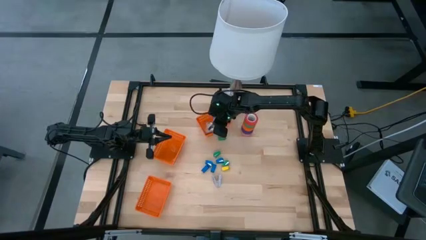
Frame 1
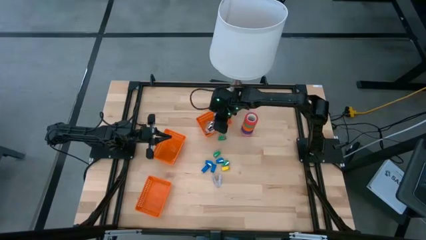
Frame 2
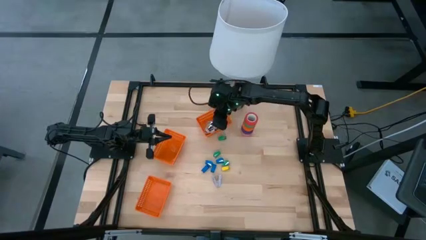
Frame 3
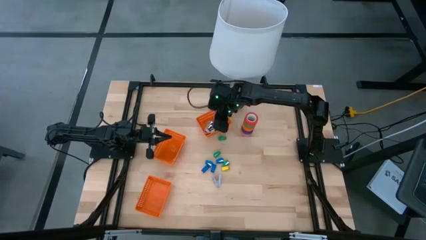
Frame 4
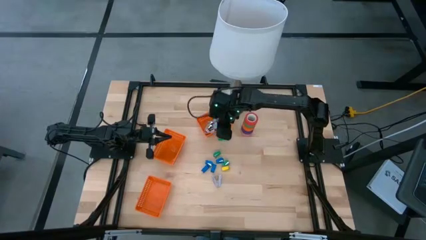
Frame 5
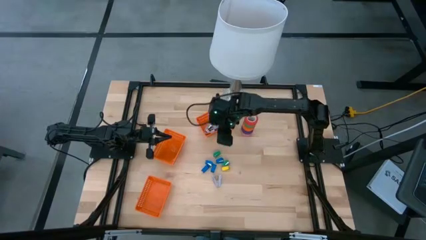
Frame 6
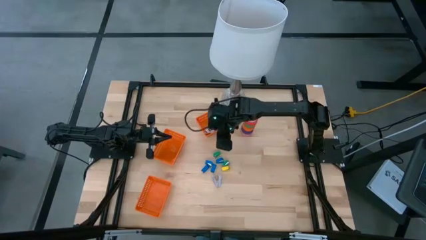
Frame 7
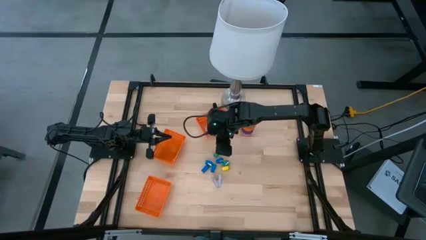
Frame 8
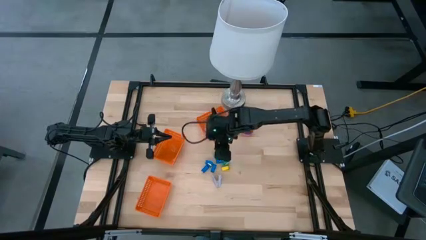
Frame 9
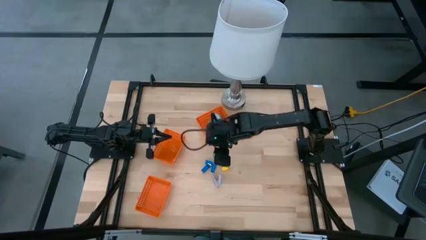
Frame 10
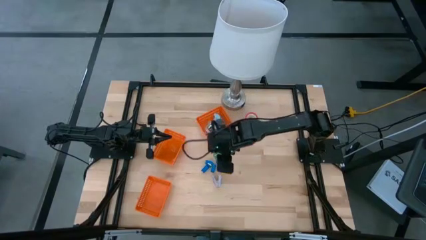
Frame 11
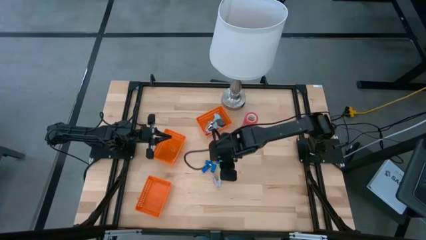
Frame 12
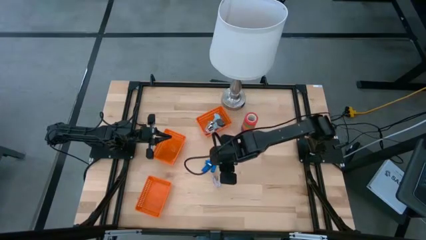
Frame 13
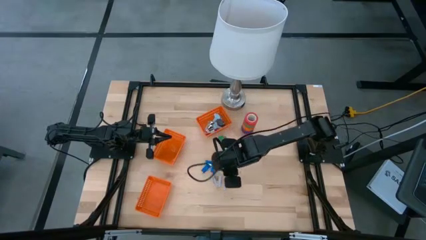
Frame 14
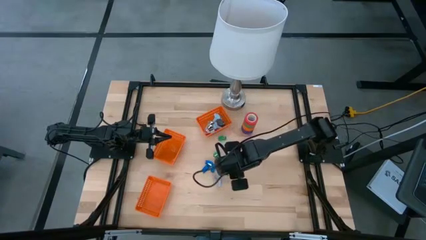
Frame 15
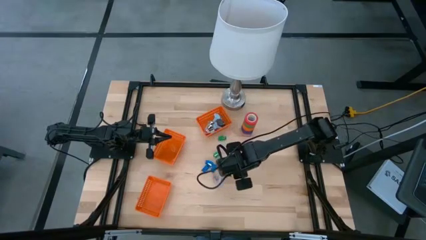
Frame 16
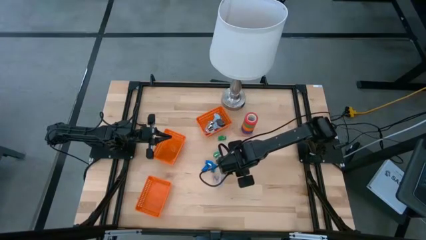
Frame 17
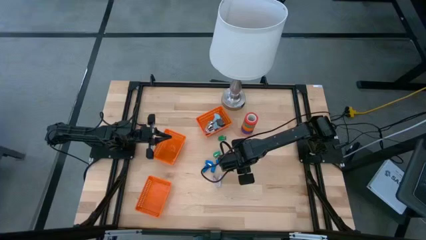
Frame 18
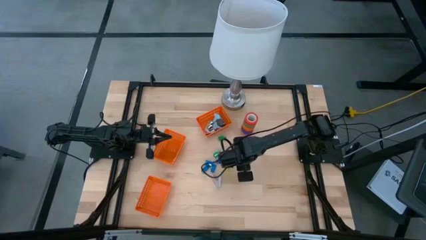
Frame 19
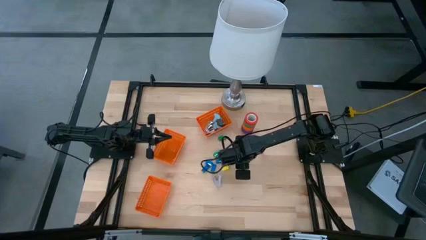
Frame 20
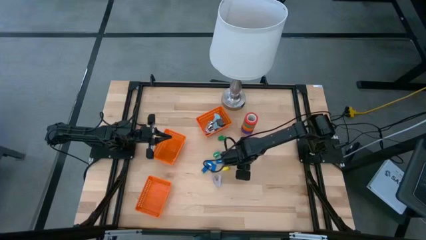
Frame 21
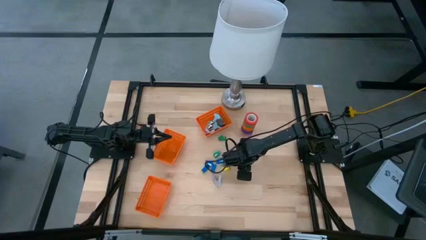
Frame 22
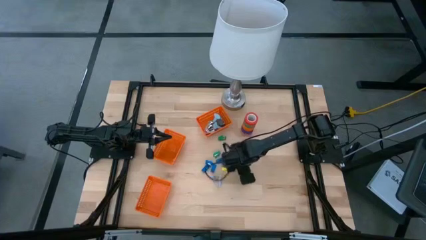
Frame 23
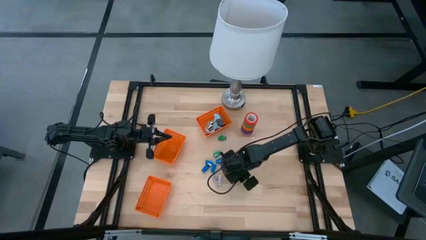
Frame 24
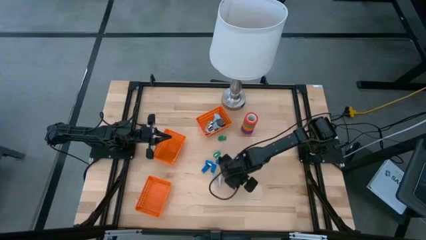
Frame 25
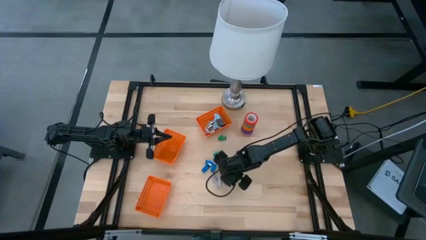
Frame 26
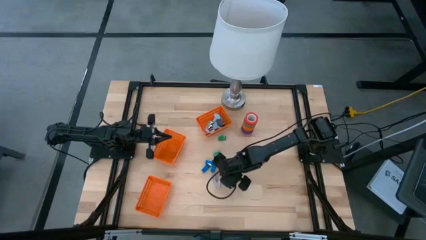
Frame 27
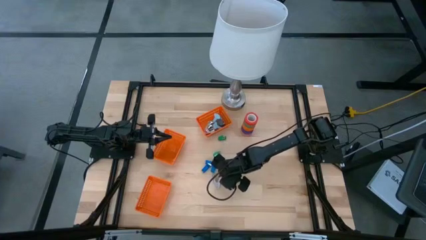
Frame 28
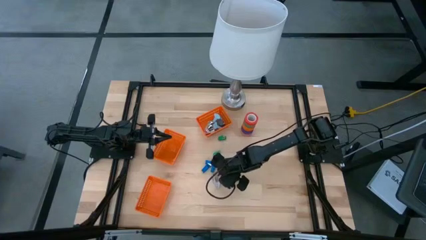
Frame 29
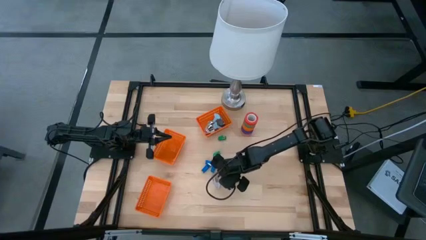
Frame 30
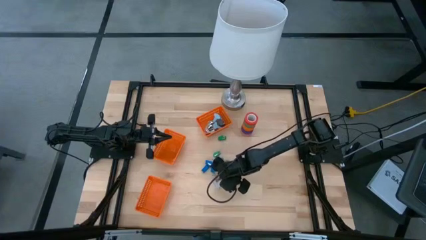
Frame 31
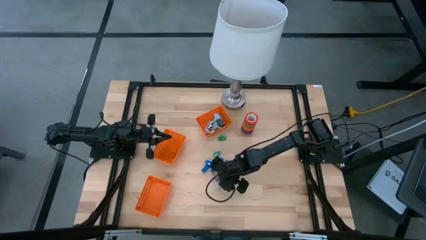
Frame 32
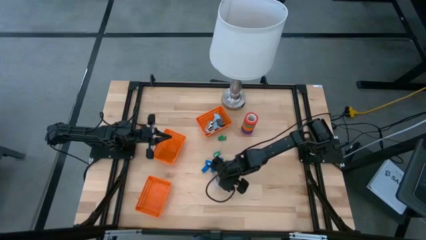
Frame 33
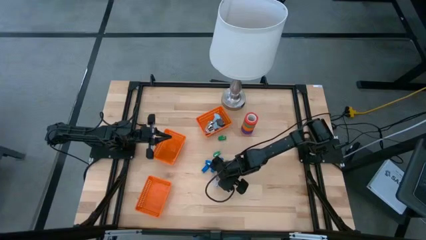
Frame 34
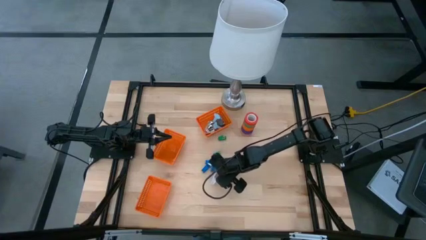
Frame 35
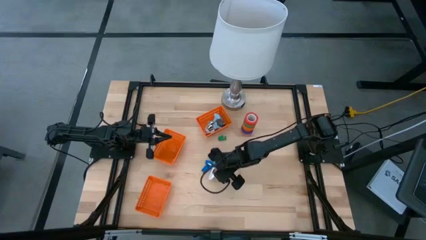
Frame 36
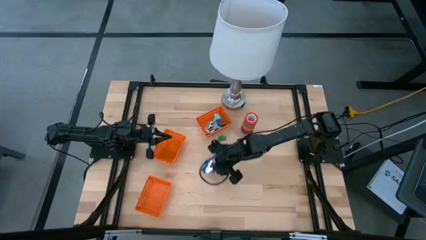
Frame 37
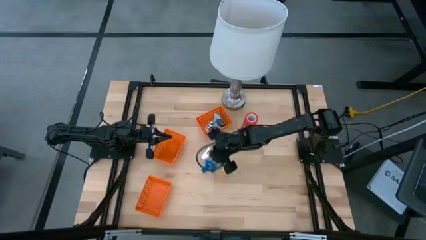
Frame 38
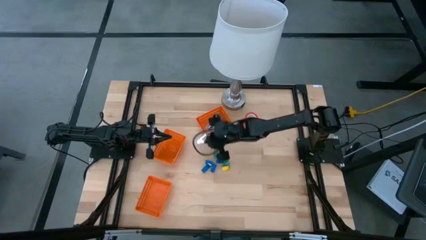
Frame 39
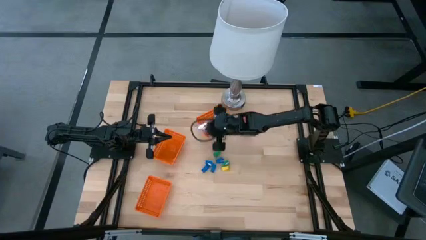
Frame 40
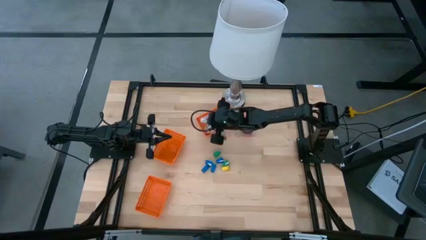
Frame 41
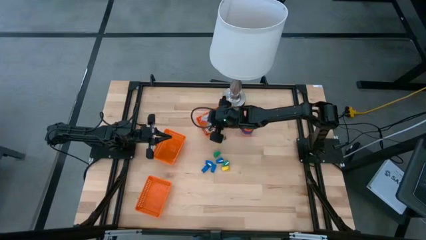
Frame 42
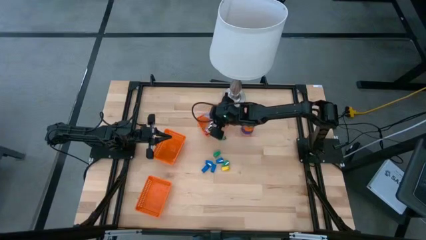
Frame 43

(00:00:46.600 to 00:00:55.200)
Task: Pick and place Stapler, Stapler remover, tape
Put the purple staple remover into the top orange bin

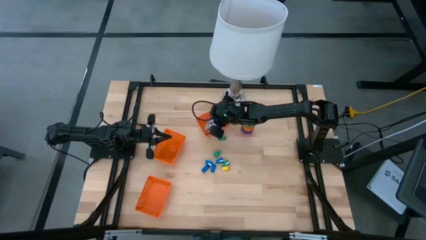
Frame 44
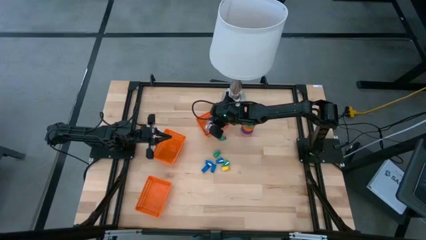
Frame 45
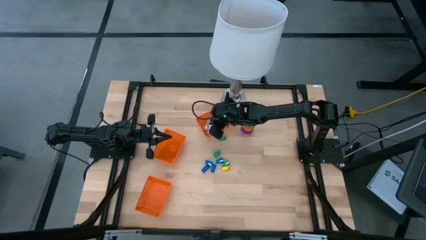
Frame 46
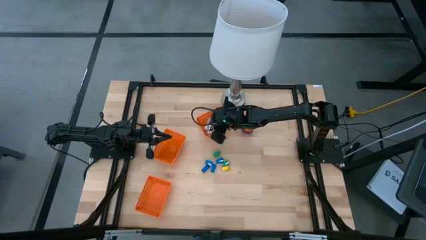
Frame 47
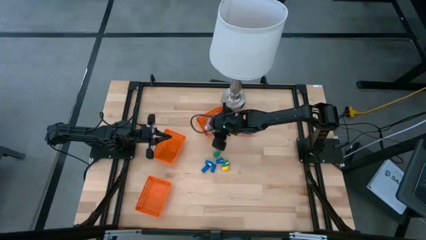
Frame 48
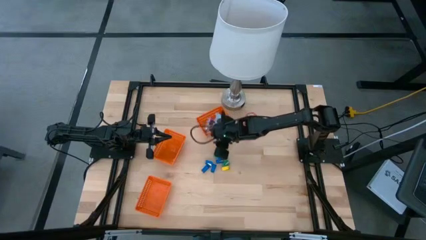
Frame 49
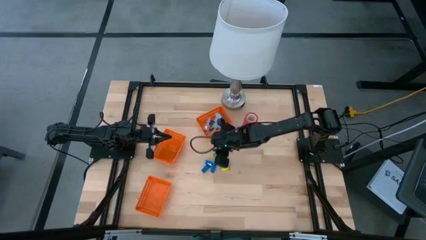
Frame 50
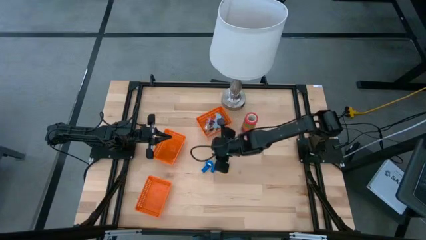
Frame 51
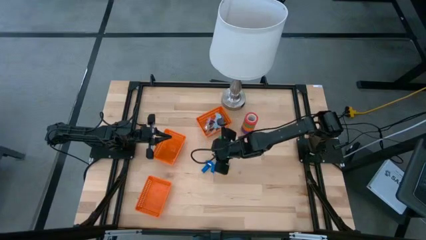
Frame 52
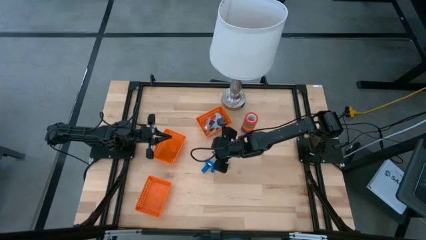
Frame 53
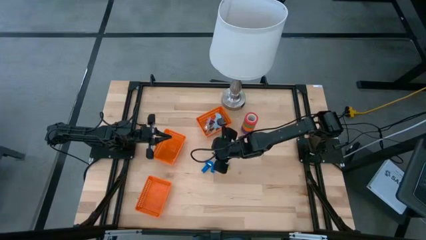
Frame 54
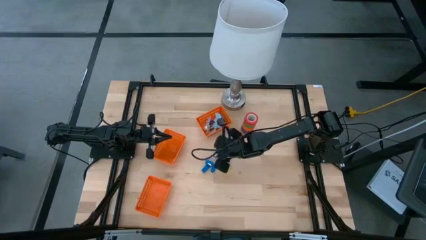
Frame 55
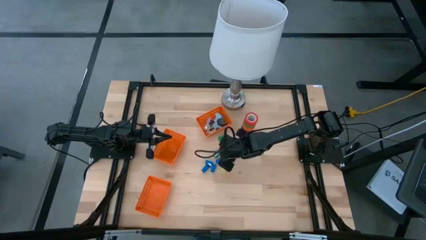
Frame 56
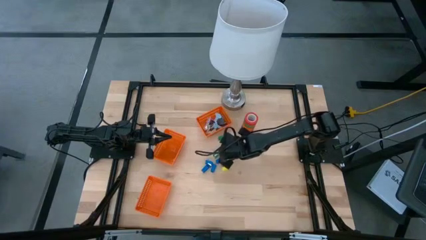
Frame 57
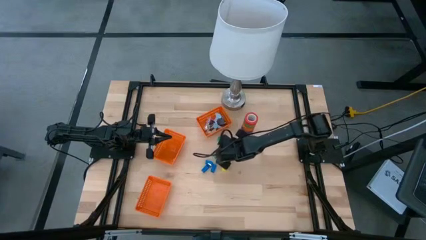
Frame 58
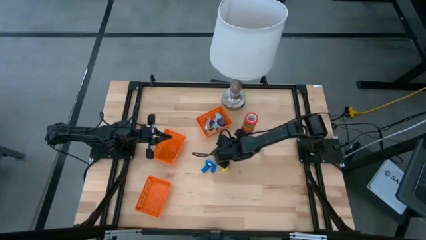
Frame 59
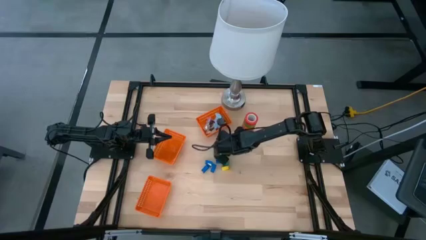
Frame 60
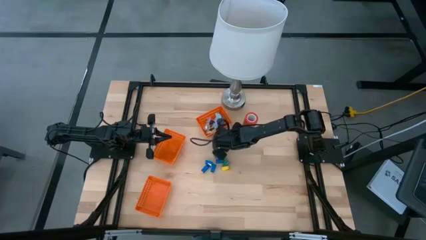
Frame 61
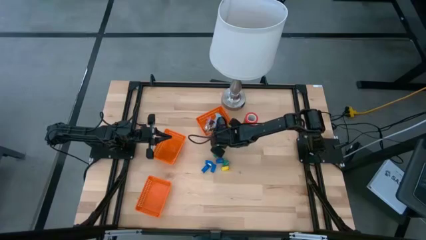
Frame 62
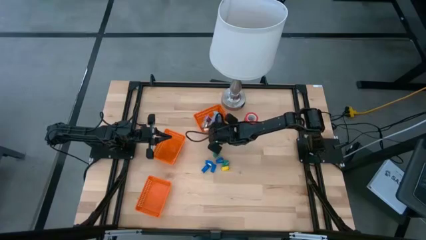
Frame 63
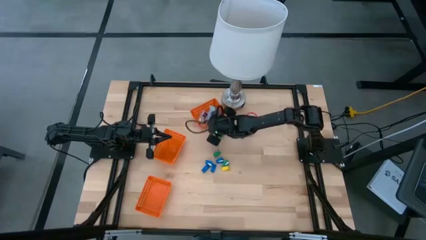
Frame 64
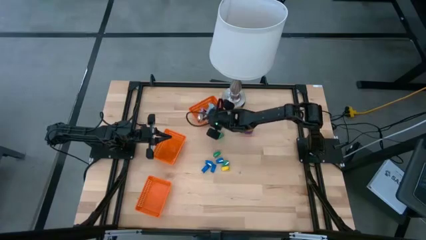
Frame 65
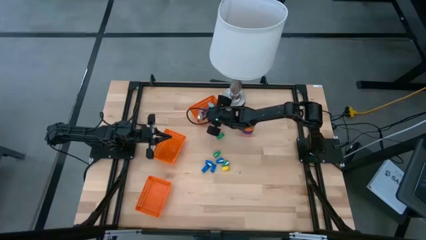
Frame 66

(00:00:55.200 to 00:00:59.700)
Adjust the top orange bin

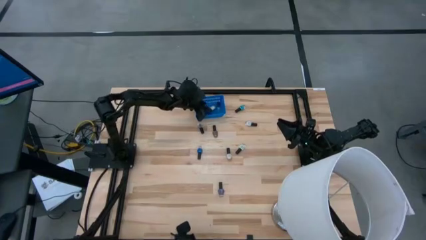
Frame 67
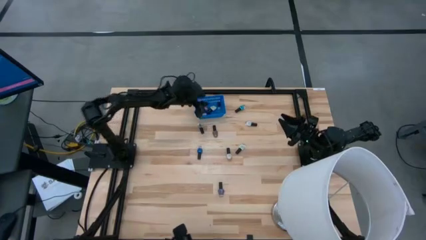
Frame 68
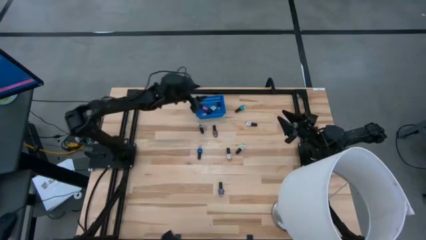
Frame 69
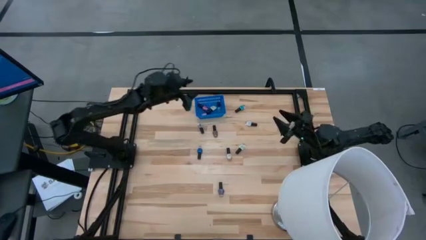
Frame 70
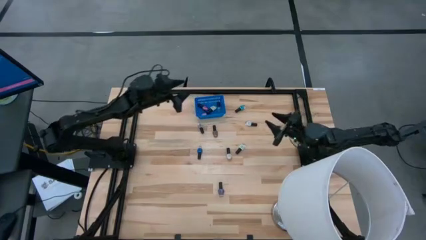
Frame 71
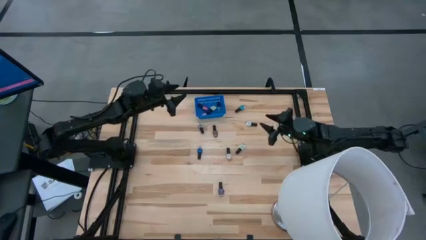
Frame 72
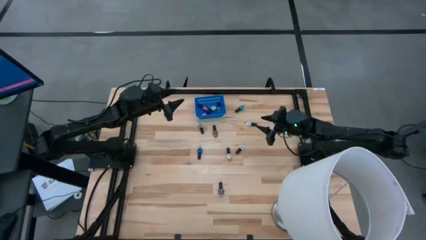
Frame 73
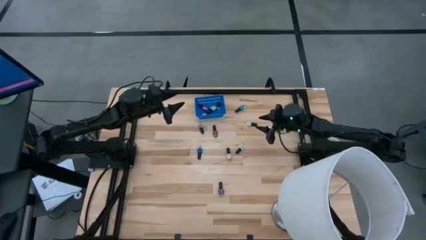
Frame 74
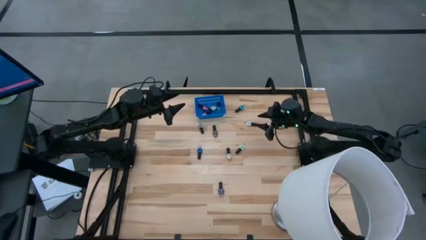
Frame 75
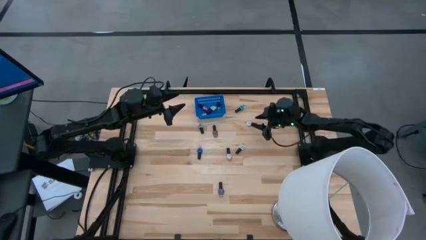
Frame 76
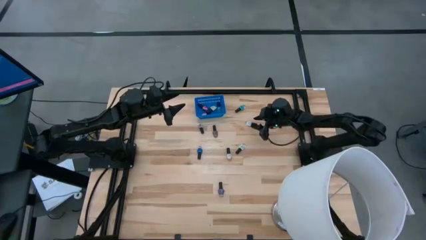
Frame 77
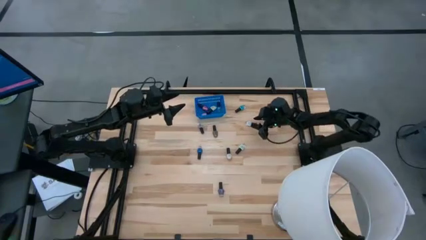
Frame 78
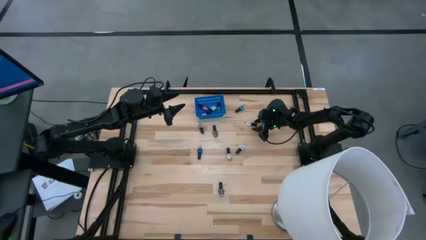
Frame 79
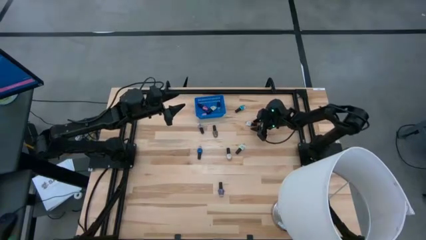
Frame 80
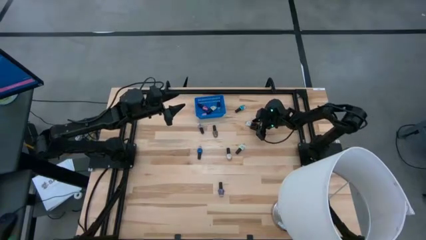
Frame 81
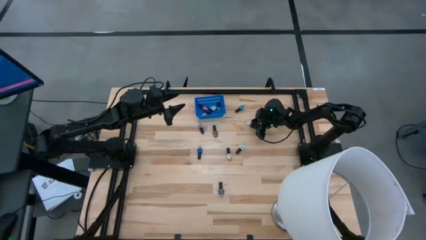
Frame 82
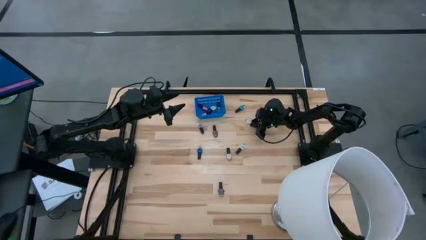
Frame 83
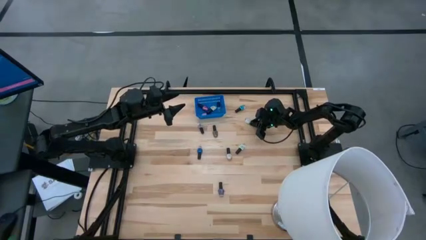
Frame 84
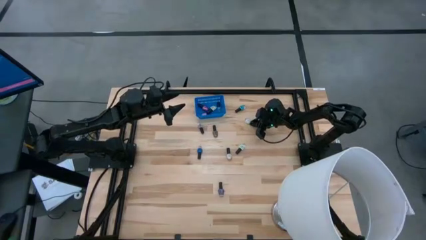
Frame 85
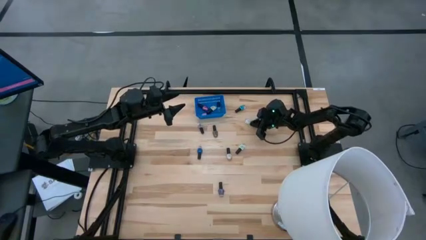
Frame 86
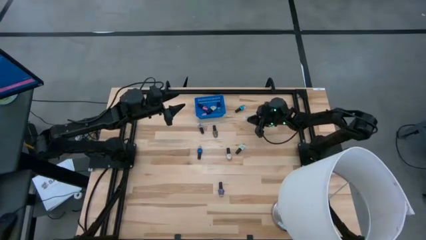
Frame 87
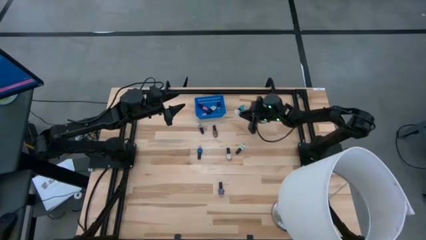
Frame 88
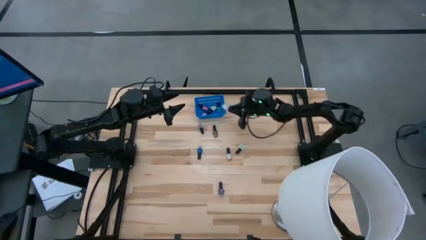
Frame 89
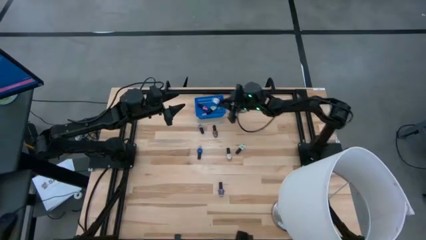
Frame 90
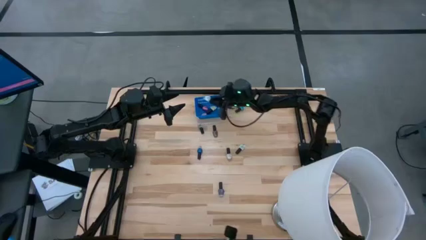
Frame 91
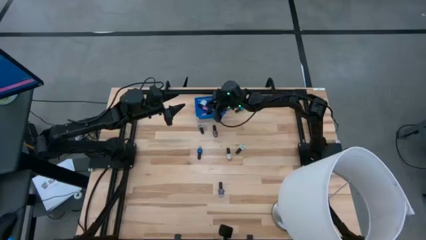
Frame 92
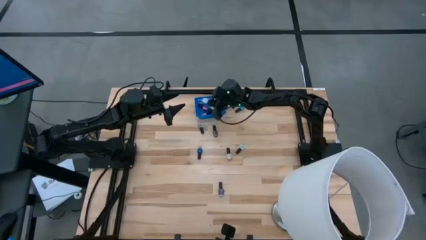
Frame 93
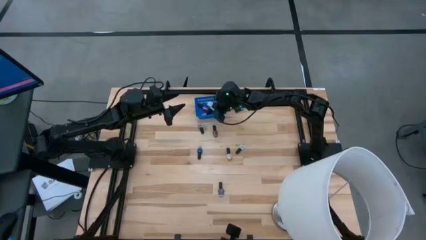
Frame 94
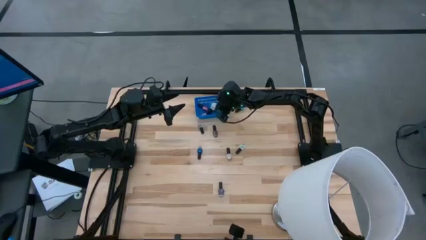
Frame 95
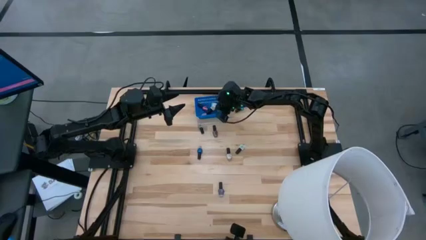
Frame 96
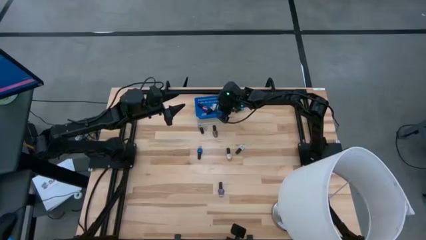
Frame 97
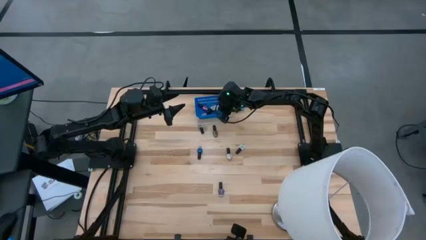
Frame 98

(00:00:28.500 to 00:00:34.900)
Task: Pick & Place Nail Polish
Put the top white nail polish bottle into the blue basket
